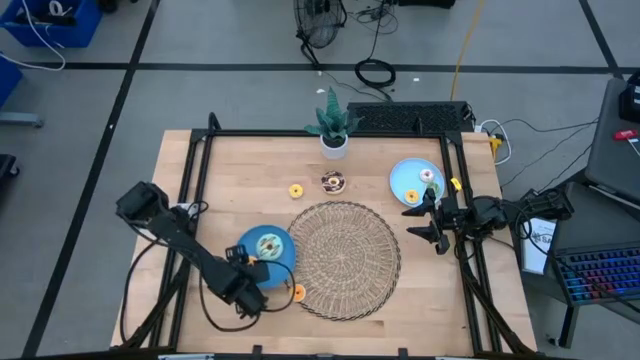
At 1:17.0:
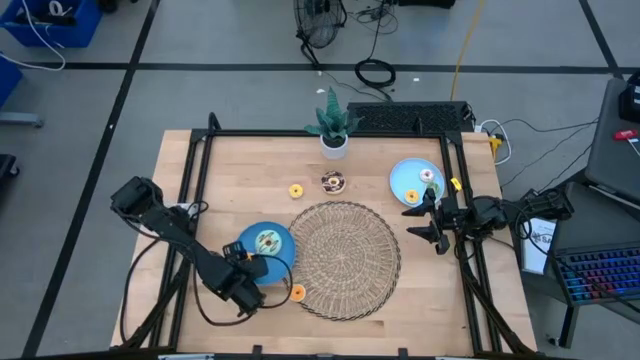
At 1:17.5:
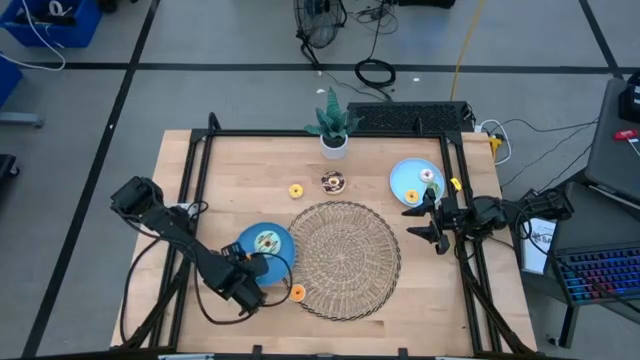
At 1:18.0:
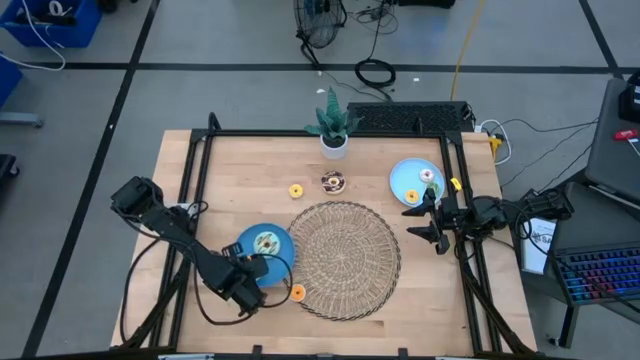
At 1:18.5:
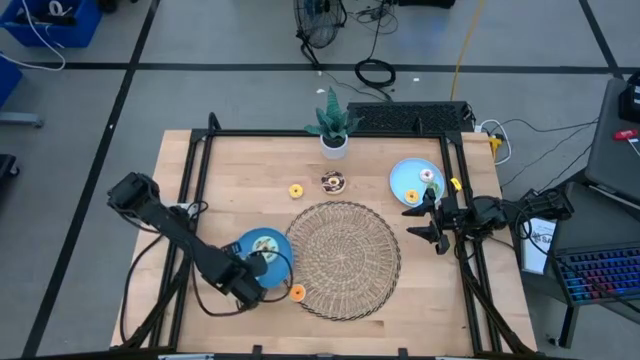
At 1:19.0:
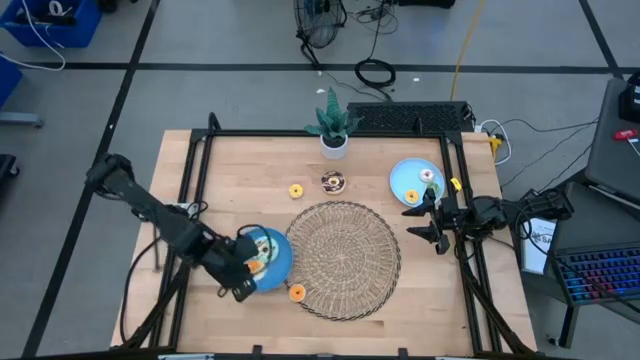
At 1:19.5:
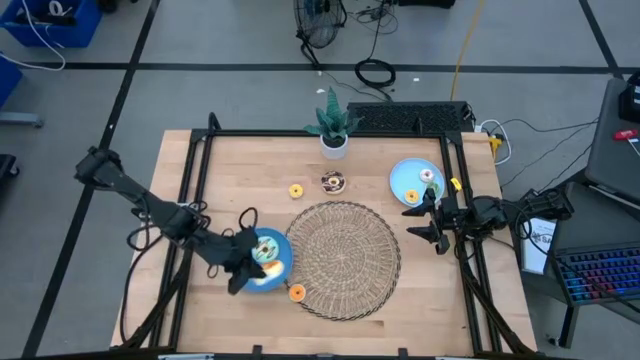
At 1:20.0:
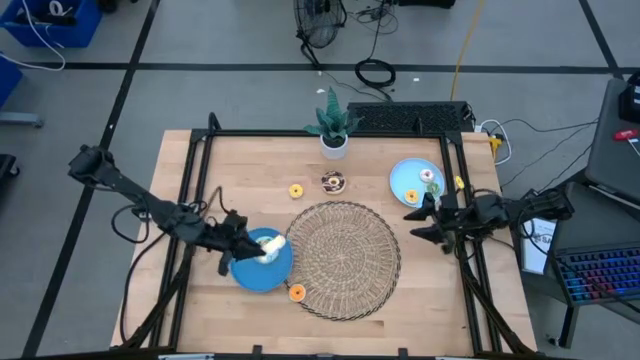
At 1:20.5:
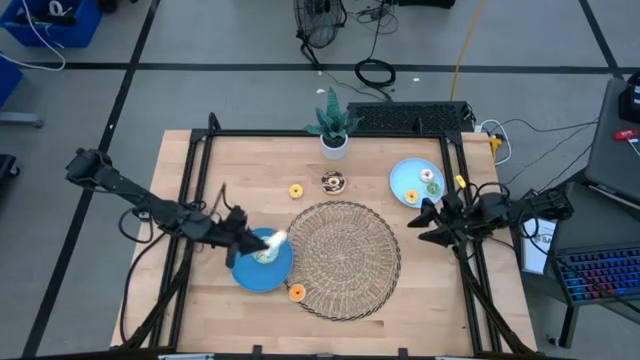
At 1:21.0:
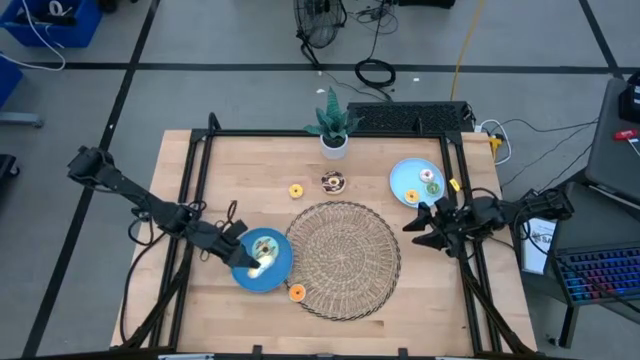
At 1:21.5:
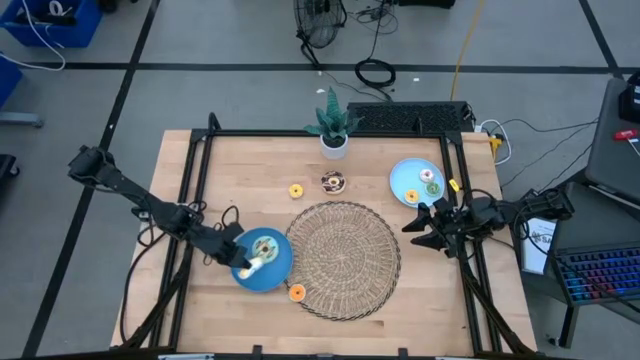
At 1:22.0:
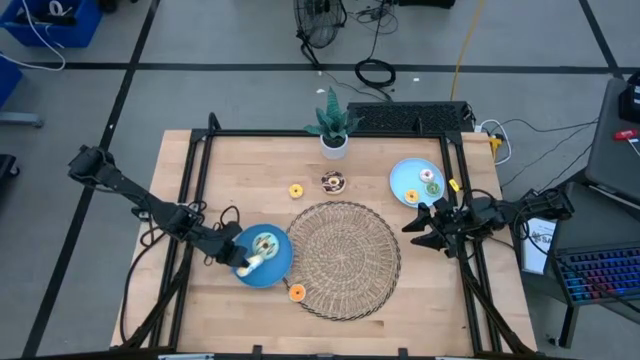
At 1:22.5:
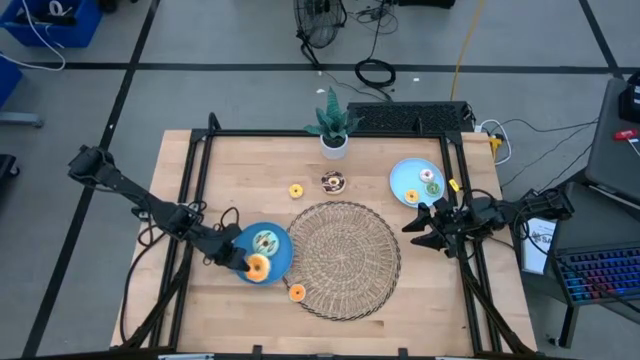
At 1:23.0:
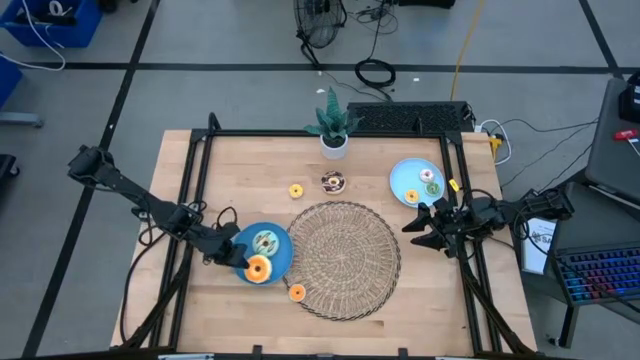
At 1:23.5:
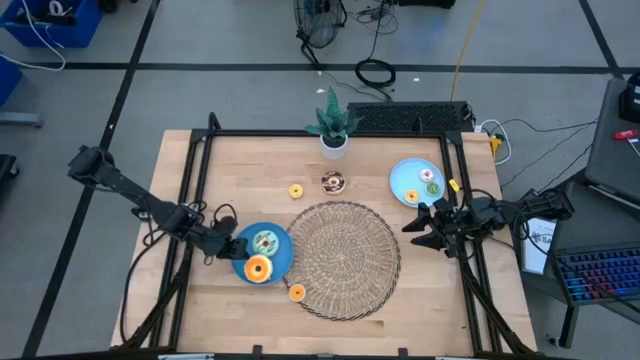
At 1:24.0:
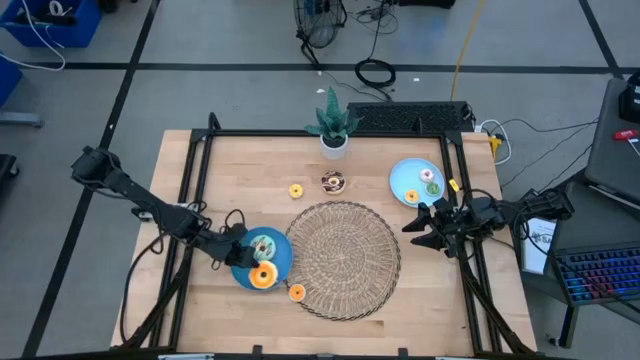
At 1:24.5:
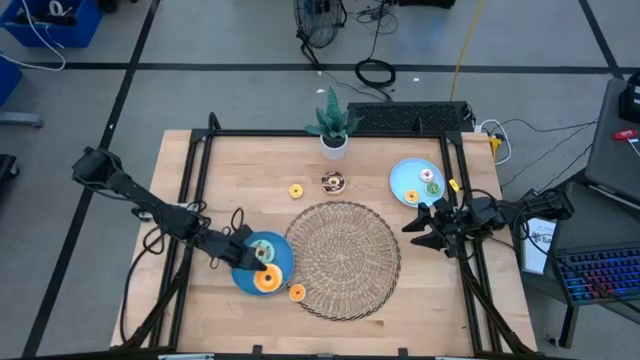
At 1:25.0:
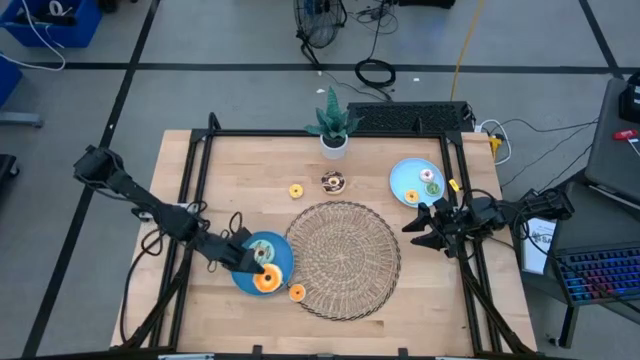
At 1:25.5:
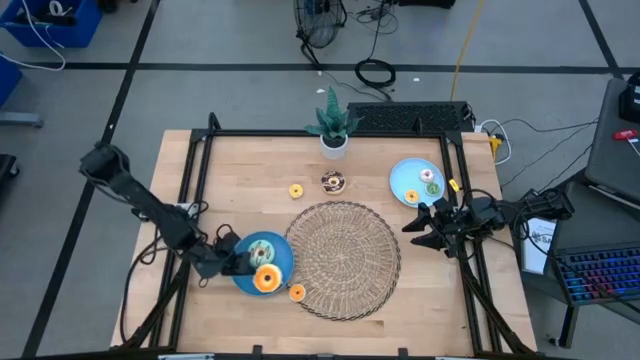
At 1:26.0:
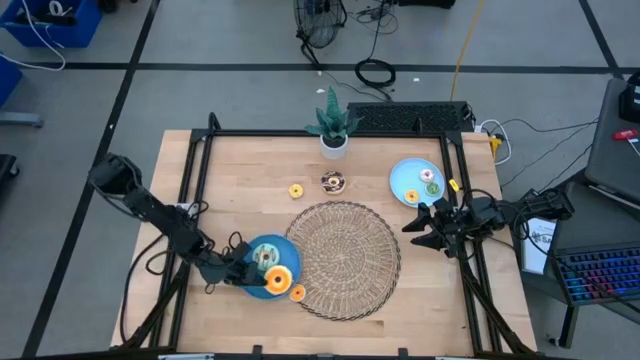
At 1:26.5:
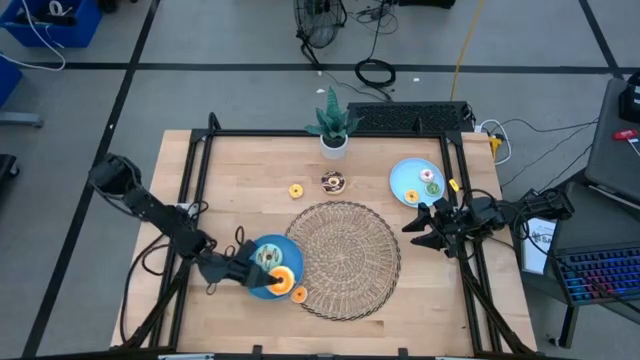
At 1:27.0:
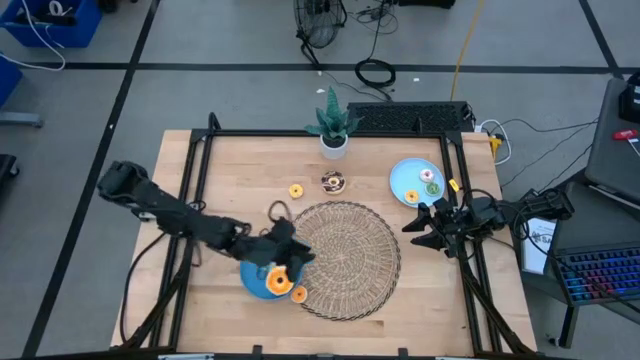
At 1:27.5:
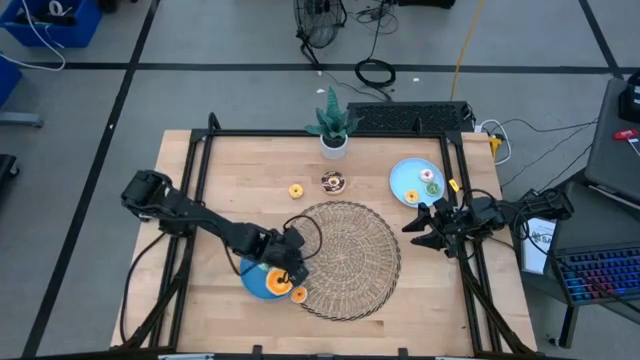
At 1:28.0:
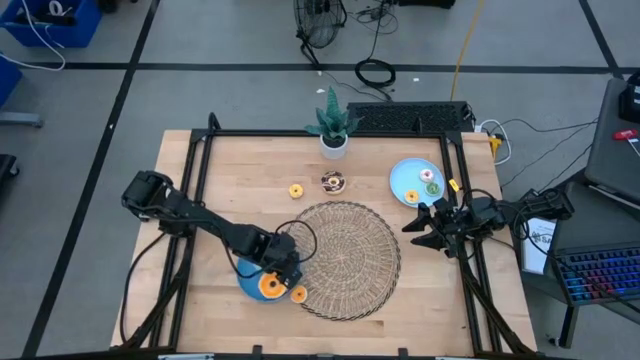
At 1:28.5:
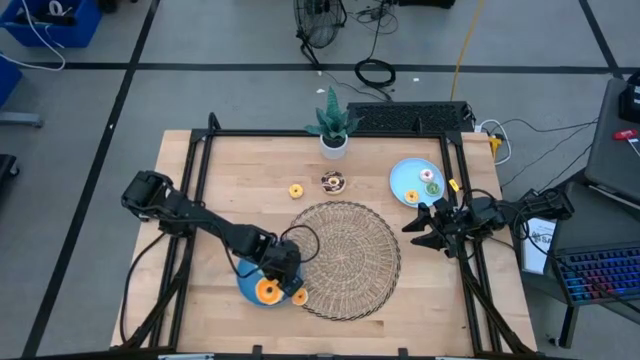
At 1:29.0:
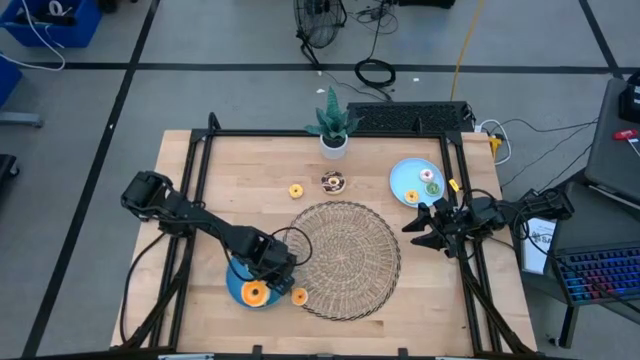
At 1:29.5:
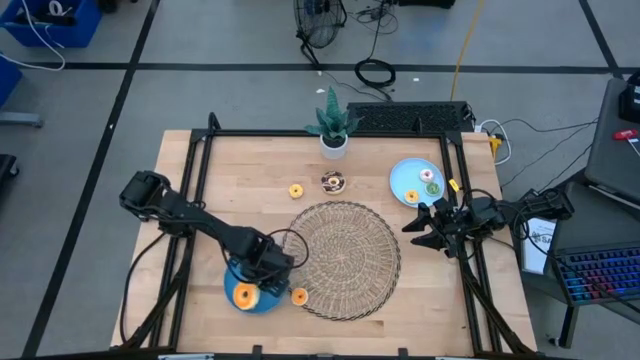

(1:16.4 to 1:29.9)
Task: Pick & Place donuts
Put the large white donut on the blue plate

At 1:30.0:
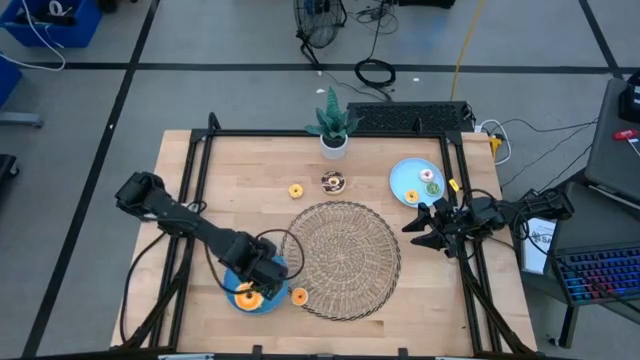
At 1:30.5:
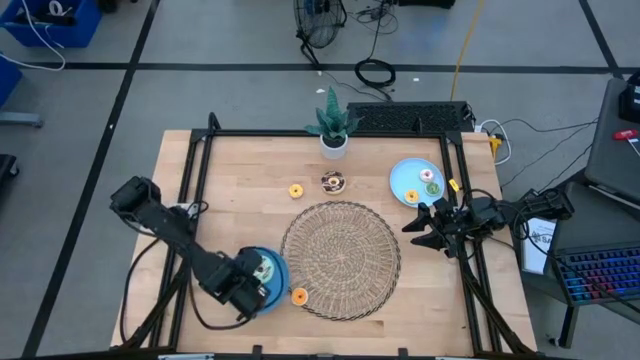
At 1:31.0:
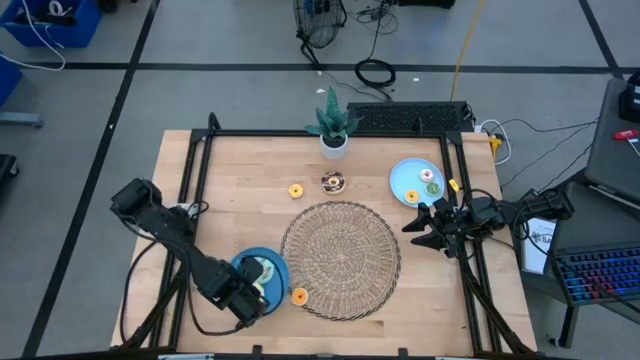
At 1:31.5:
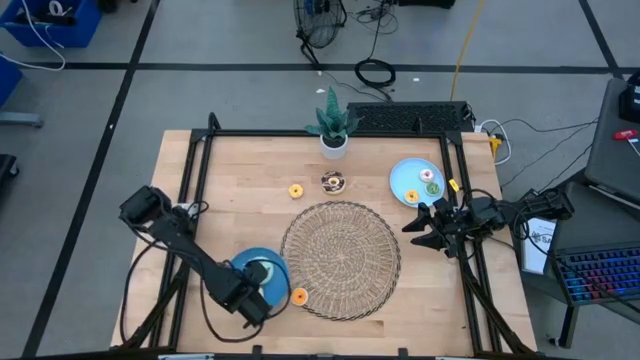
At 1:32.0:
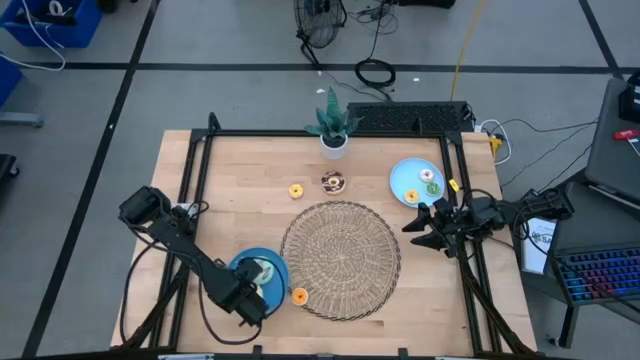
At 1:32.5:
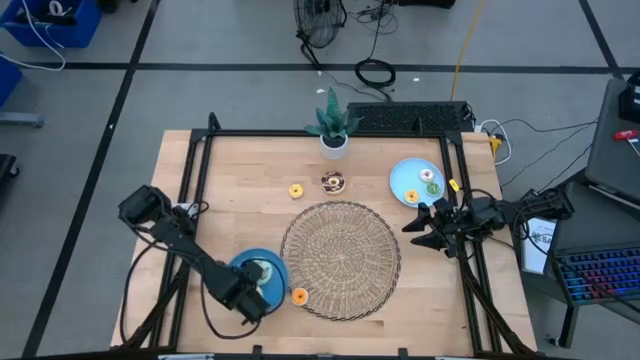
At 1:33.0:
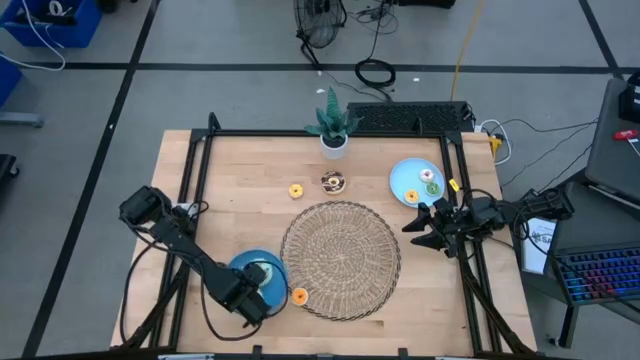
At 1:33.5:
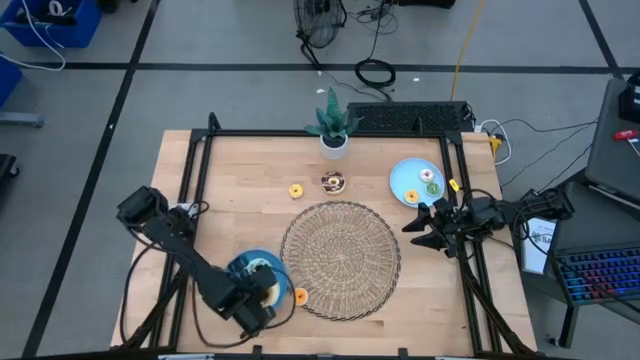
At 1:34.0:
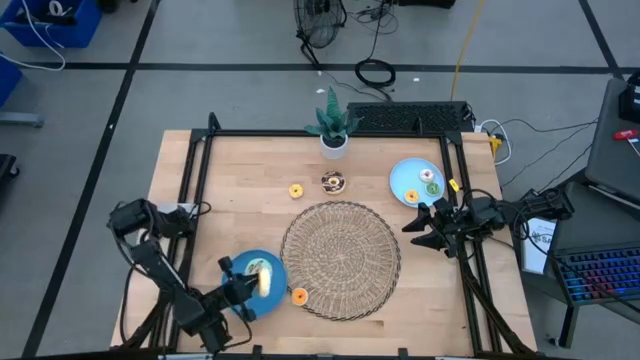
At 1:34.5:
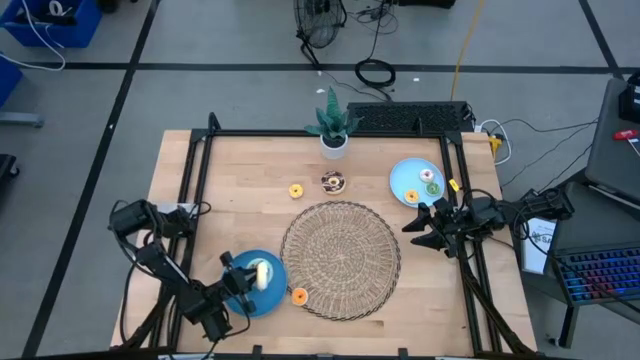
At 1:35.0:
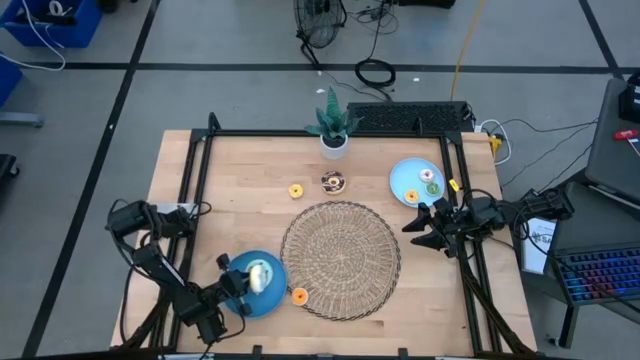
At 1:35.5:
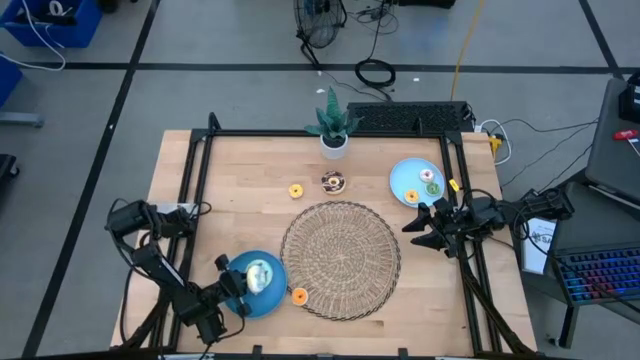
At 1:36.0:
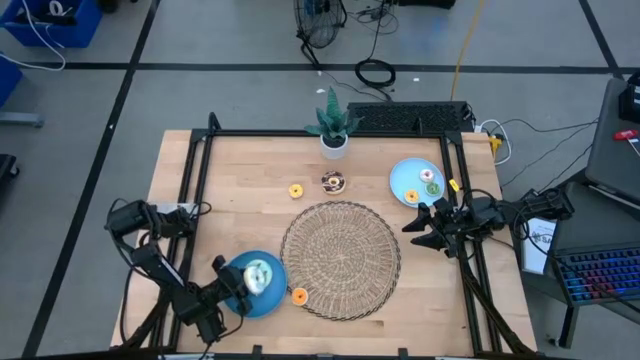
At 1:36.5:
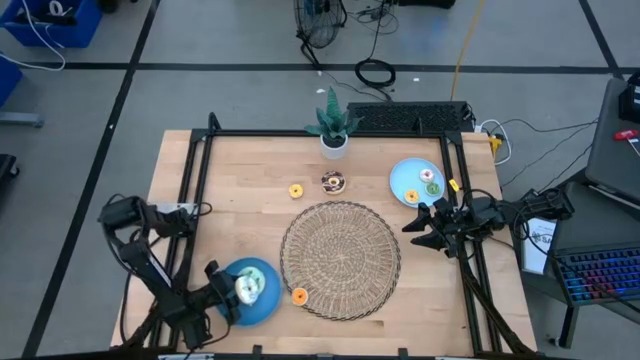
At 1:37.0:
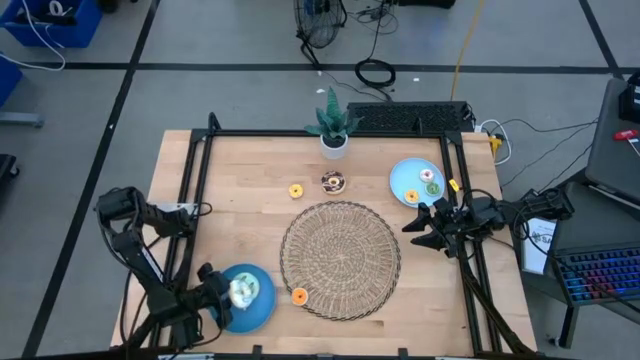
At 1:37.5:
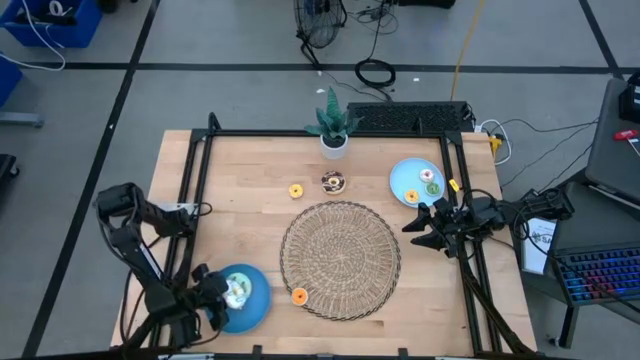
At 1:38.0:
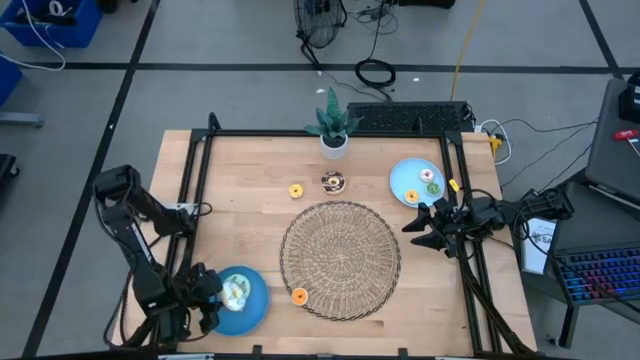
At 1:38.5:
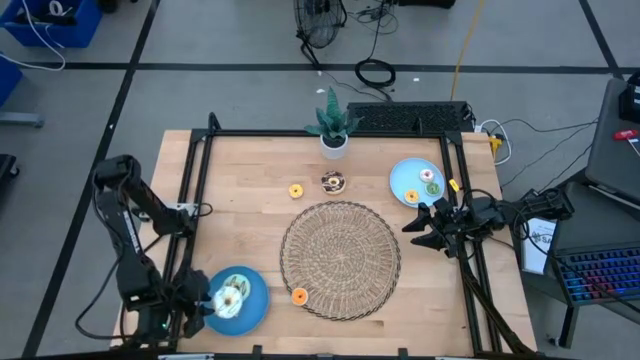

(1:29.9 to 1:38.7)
Put the large white donut on the blue plate
